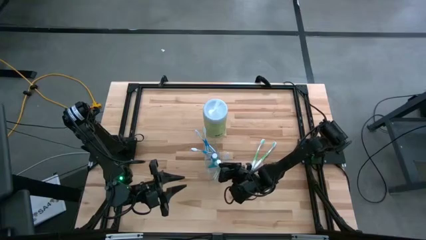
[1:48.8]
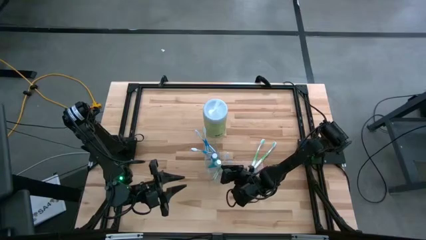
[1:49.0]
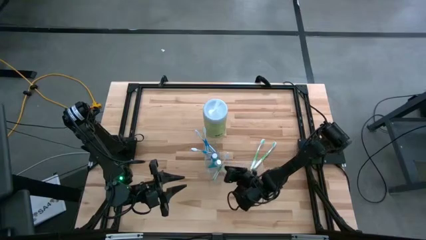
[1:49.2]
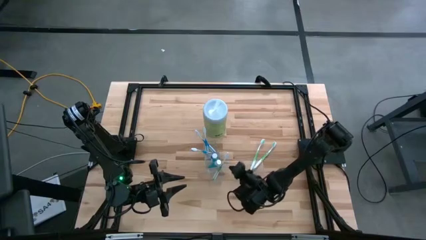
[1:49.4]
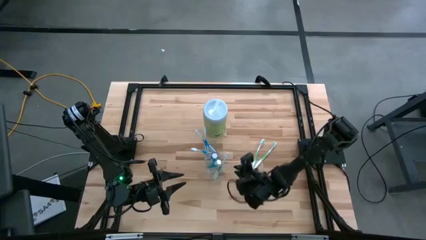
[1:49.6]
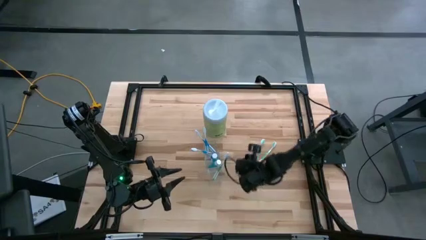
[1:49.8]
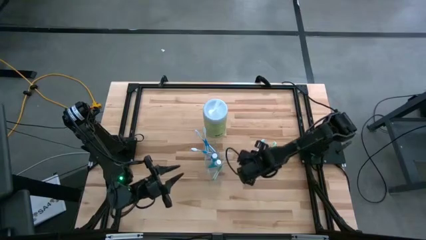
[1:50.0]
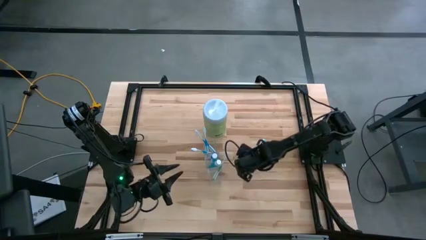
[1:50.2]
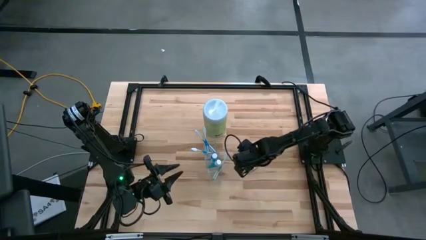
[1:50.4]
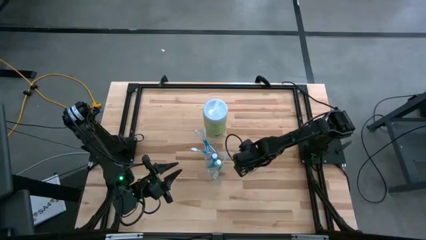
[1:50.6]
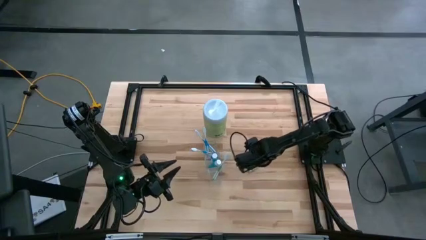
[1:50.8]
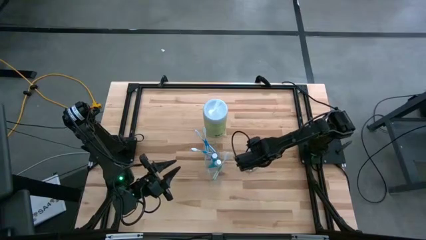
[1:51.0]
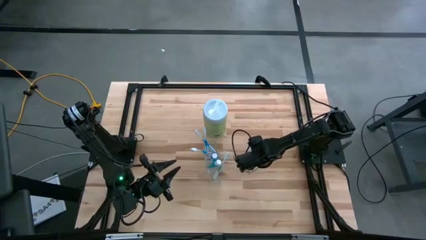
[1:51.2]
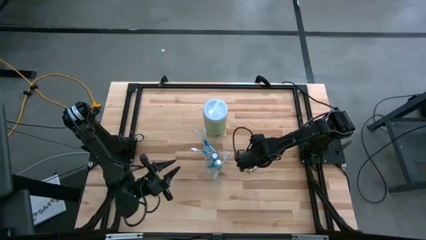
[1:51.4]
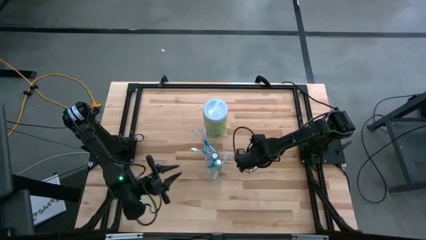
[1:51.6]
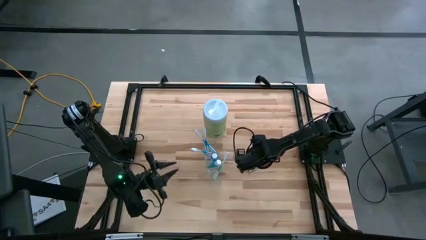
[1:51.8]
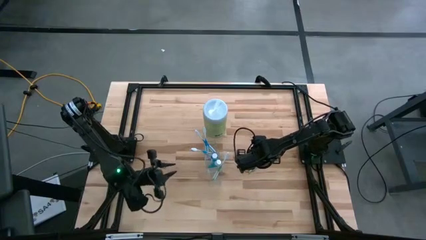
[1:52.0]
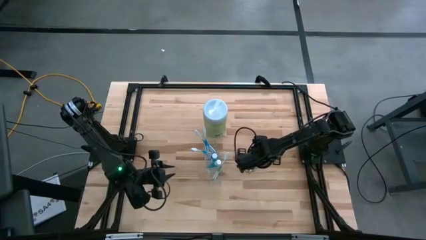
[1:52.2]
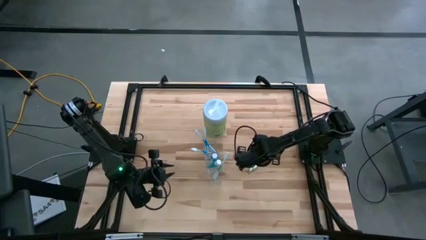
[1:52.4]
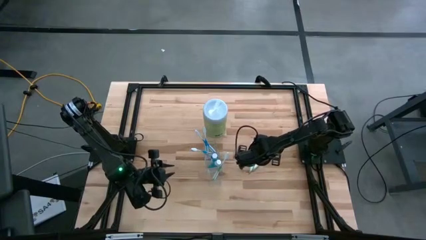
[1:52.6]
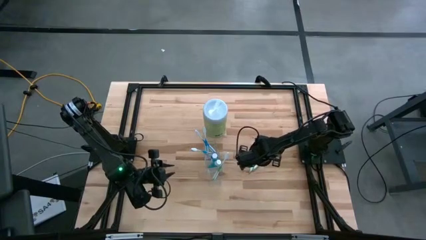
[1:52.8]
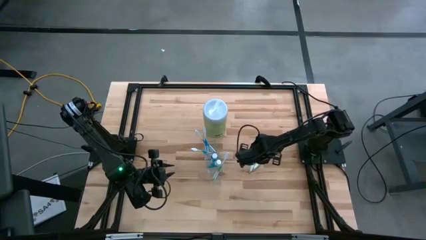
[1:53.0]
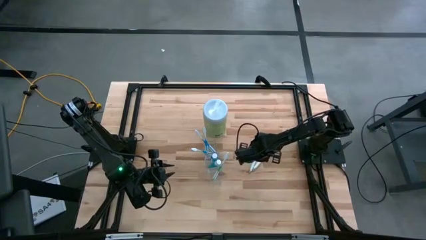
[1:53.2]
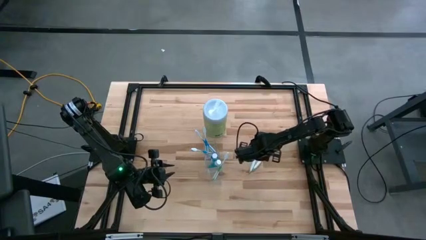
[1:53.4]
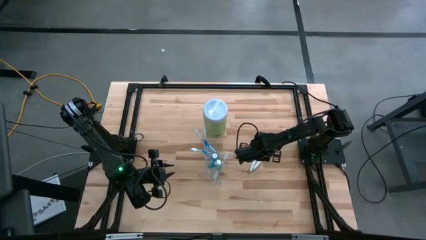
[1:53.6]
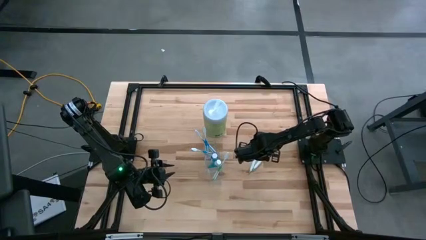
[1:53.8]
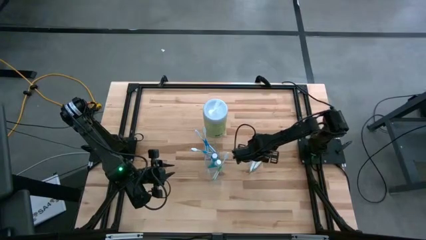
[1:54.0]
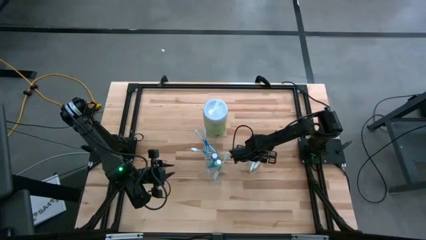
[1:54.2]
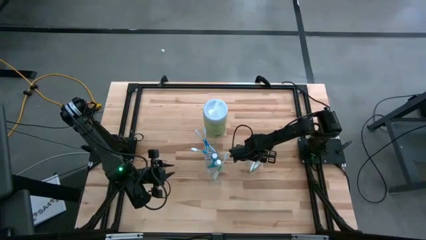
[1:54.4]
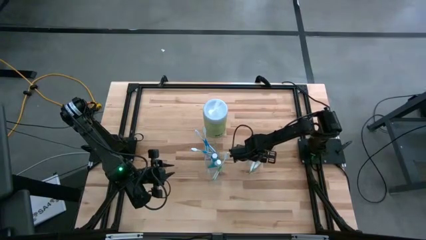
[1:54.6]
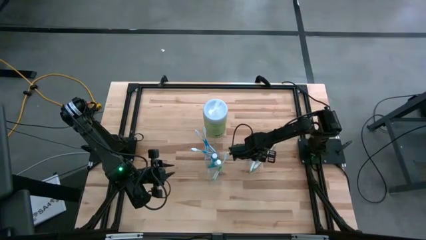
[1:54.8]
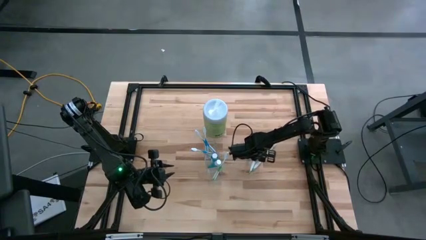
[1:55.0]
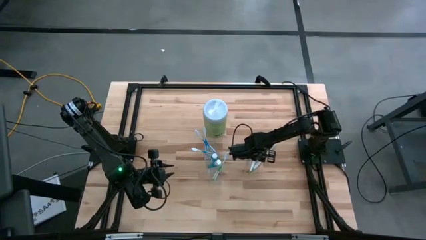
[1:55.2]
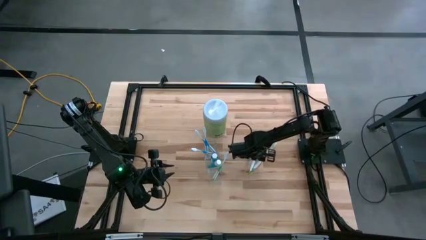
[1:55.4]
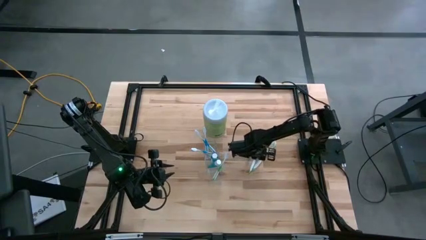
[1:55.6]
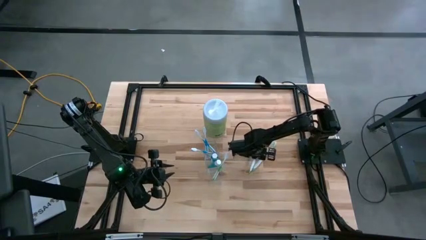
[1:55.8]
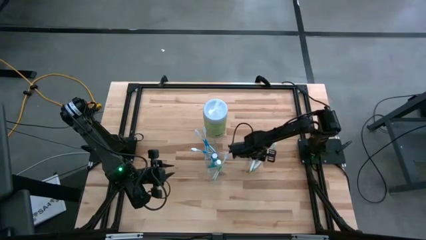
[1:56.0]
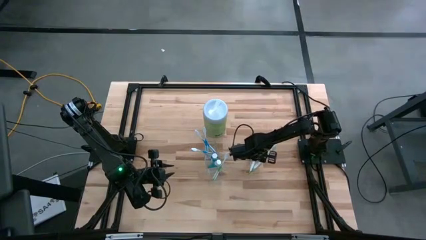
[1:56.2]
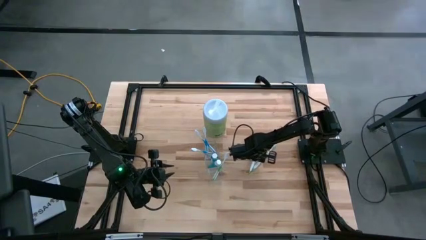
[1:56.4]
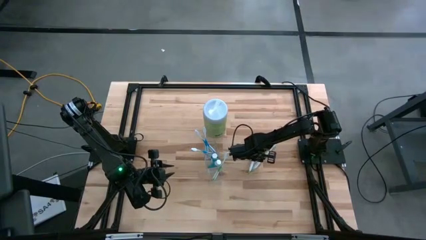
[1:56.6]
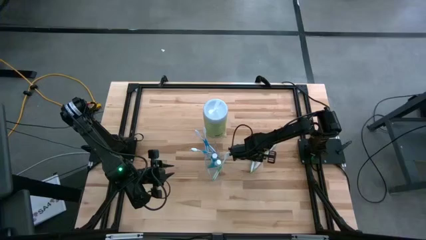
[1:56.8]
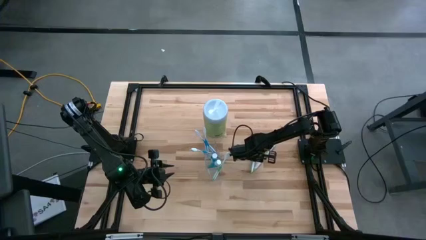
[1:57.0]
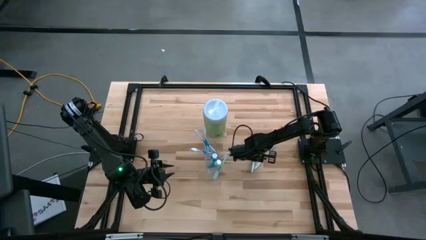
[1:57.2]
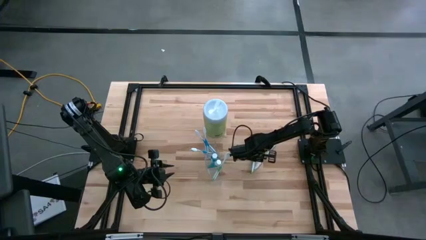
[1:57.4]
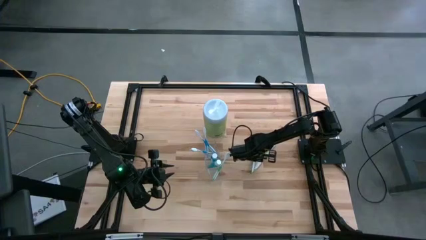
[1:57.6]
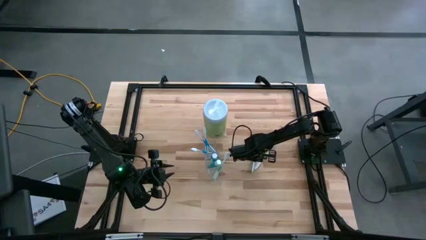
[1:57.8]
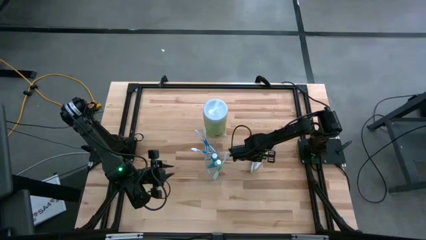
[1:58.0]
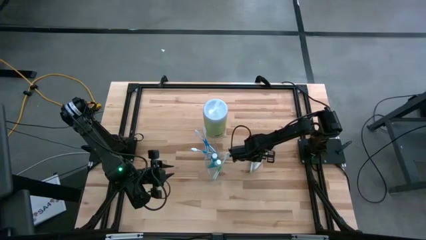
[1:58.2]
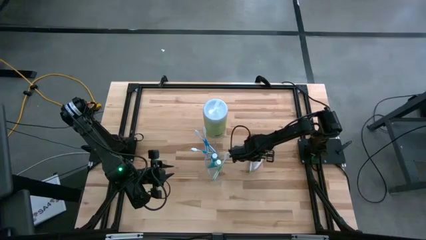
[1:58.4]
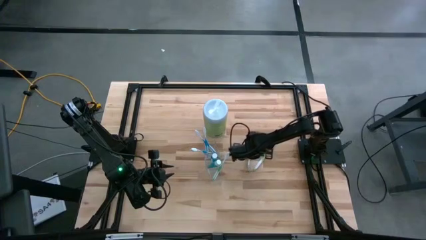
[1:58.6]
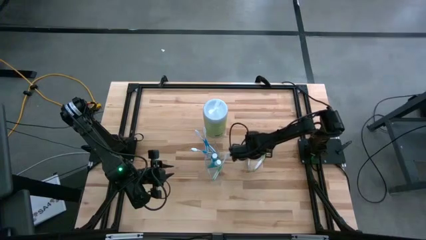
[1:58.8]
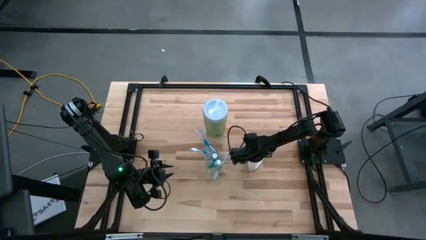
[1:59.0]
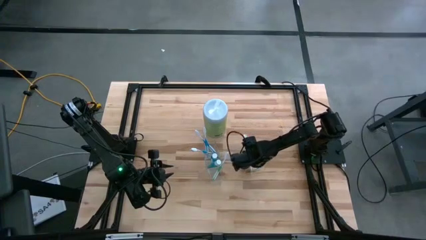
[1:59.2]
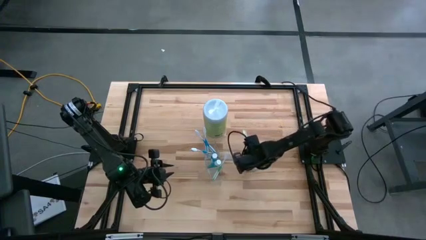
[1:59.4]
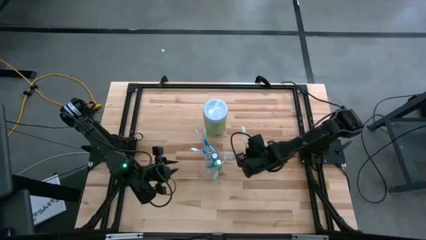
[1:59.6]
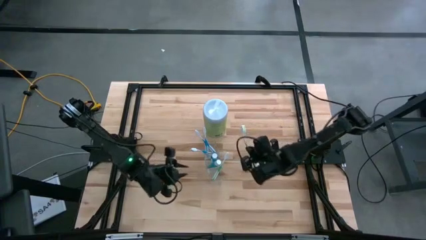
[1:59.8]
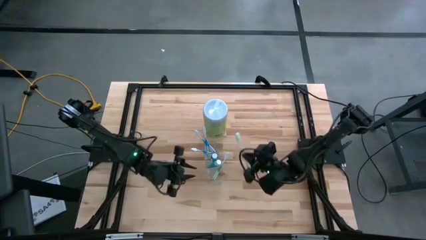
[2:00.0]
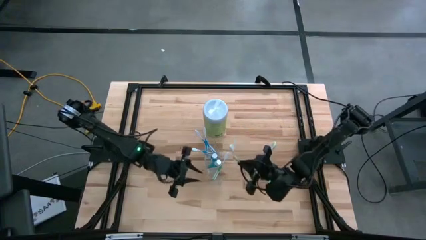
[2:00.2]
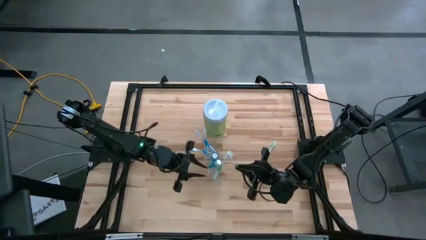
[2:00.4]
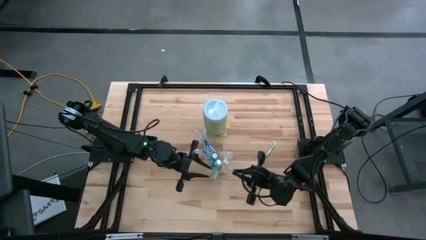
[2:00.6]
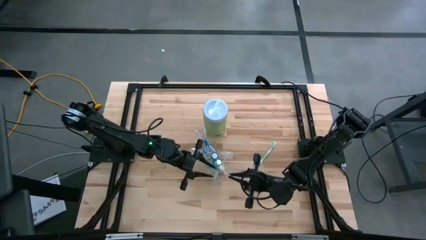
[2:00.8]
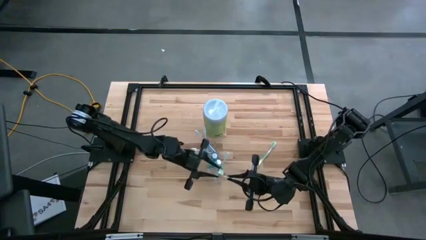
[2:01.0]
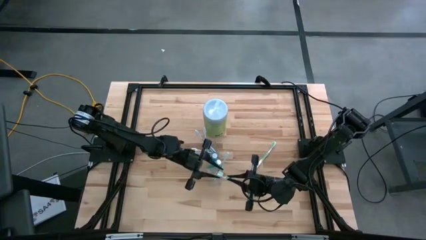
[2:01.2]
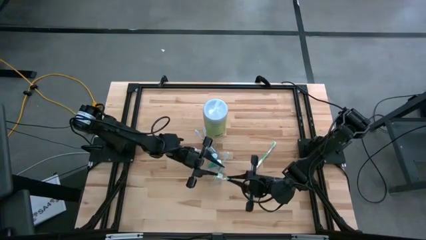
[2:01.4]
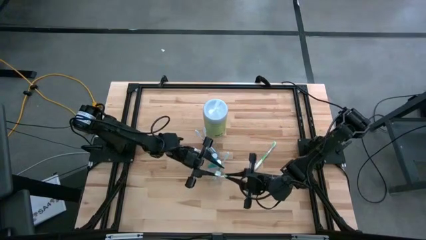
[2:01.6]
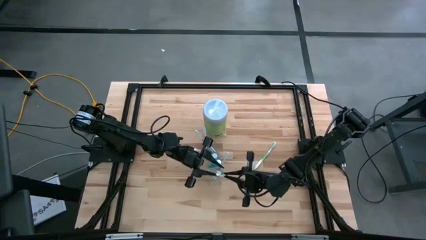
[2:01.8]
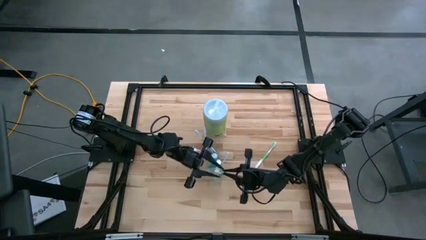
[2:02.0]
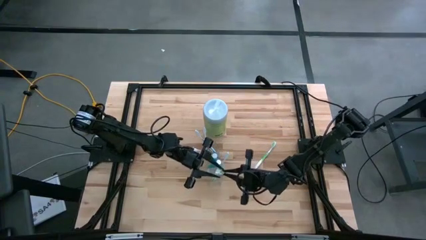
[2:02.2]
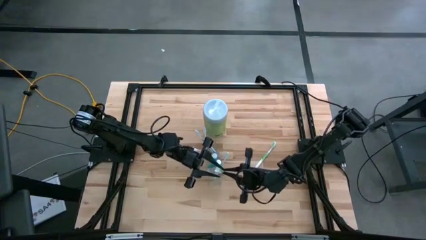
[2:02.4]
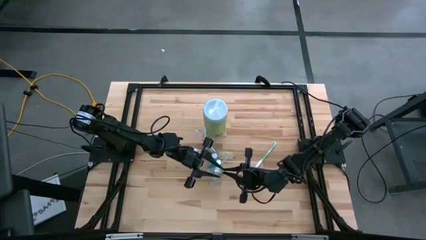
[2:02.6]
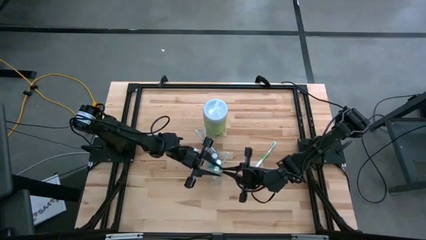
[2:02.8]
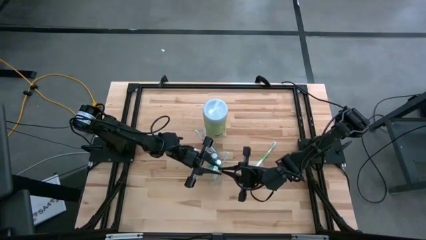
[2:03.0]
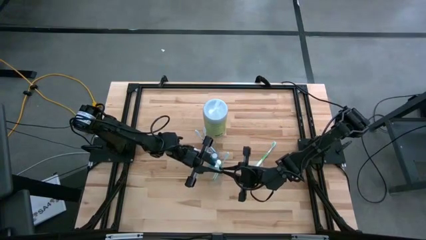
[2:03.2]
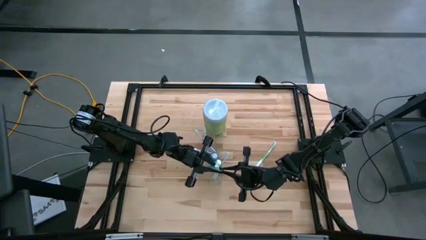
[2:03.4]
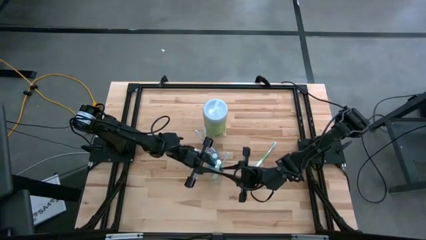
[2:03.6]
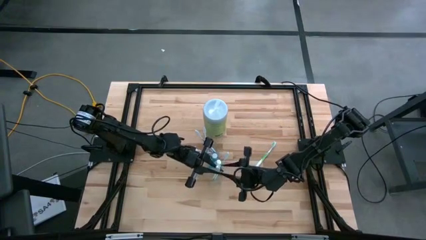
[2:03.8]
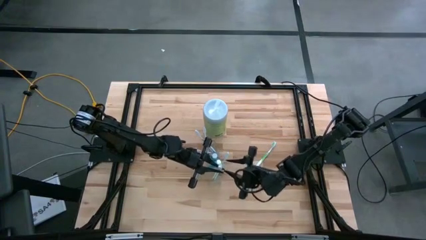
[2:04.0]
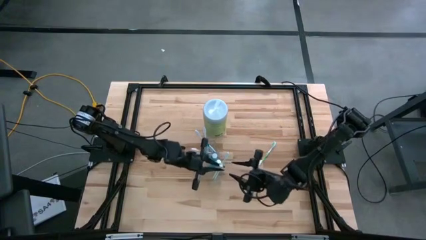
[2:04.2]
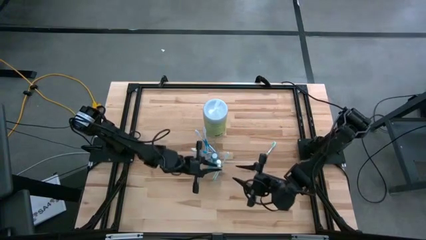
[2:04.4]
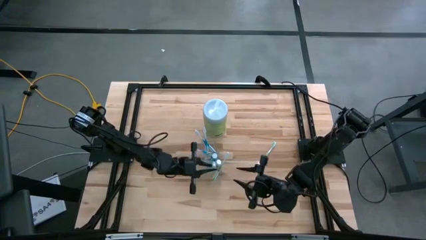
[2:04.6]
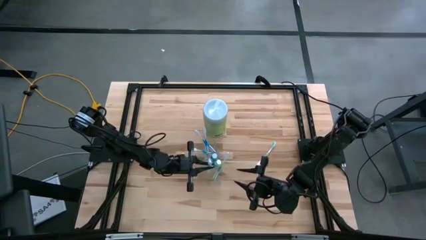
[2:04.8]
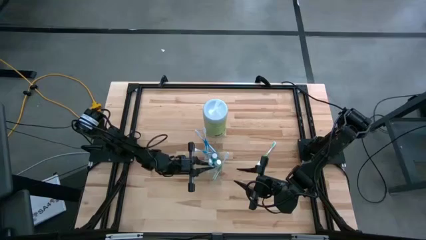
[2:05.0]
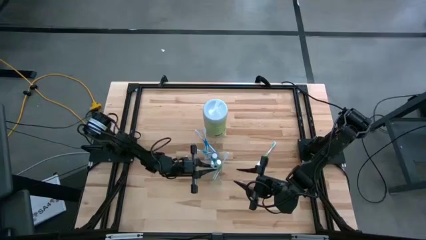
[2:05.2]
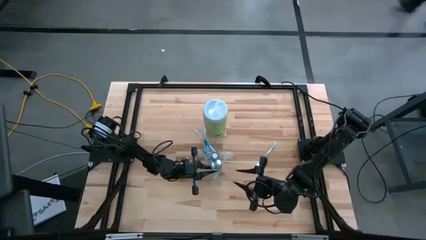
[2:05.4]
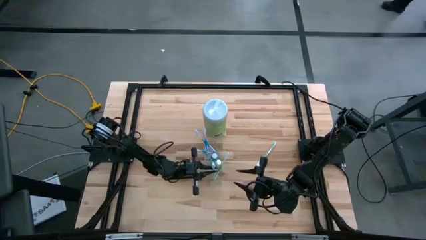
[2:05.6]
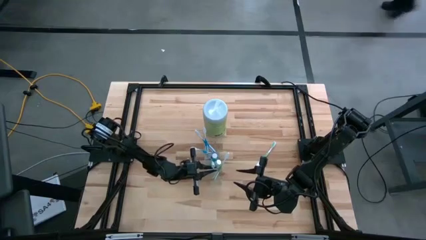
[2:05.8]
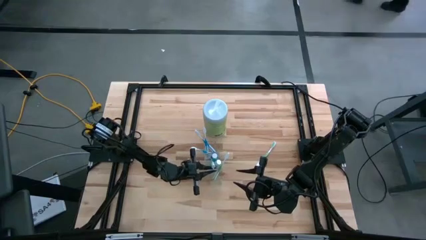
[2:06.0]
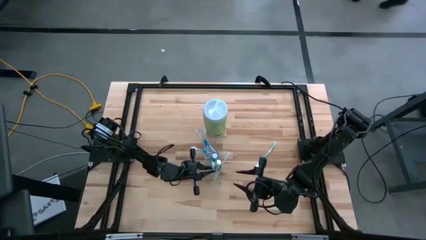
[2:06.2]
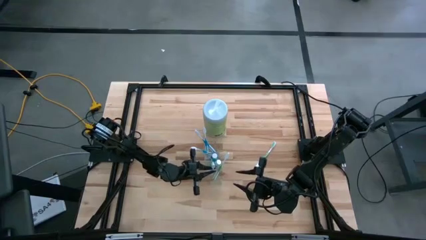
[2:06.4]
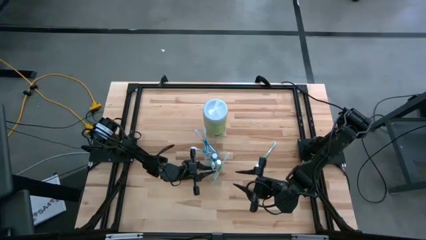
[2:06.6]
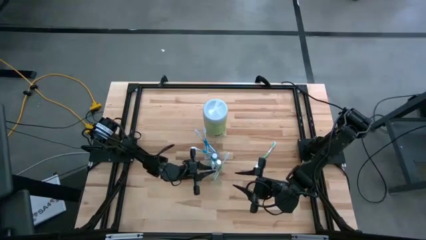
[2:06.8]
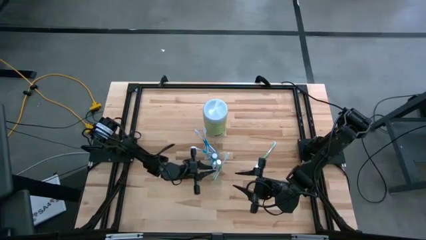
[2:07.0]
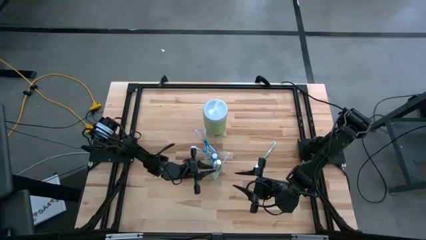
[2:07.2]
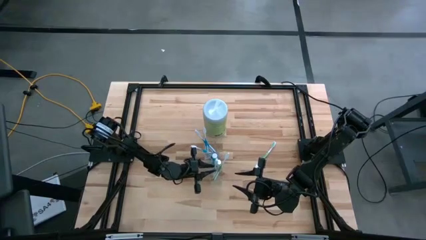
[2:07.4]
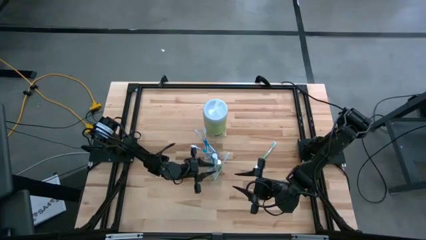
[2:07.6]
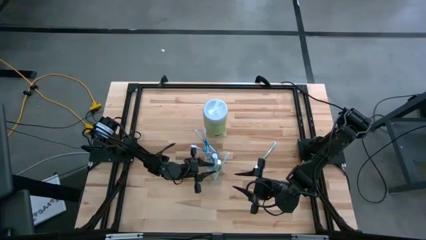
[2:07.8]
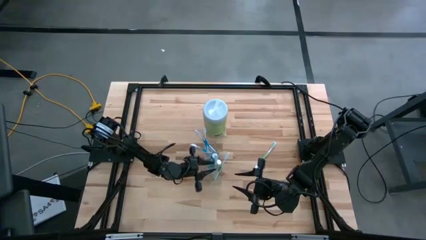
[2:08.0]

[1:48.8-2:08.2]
Task: Pick & Place toothbrushing station
Put the left green toothbrush into the transparent organizer
